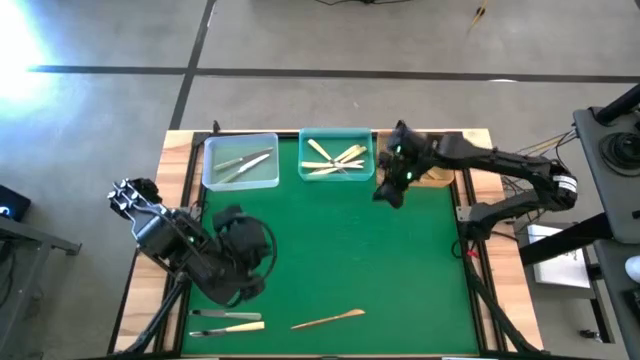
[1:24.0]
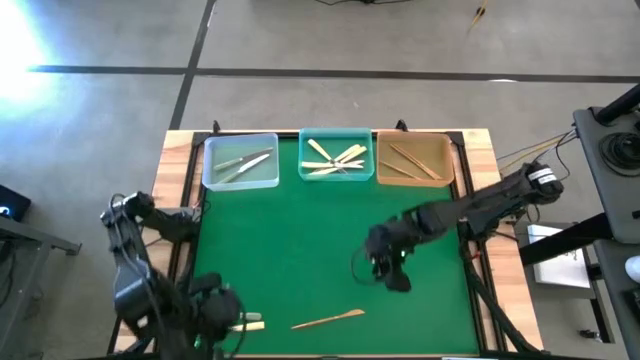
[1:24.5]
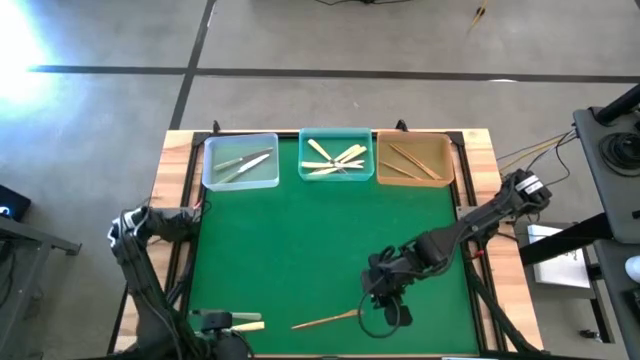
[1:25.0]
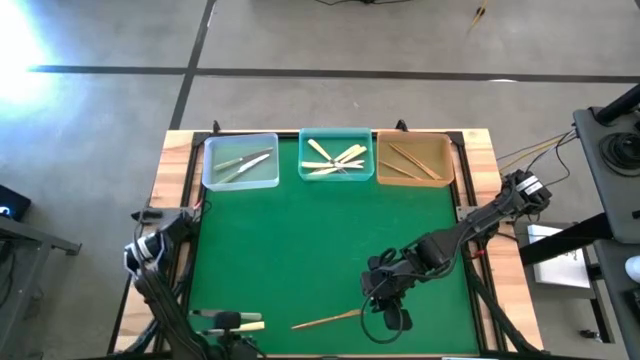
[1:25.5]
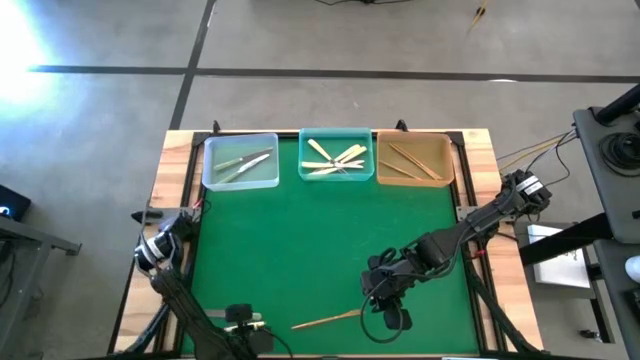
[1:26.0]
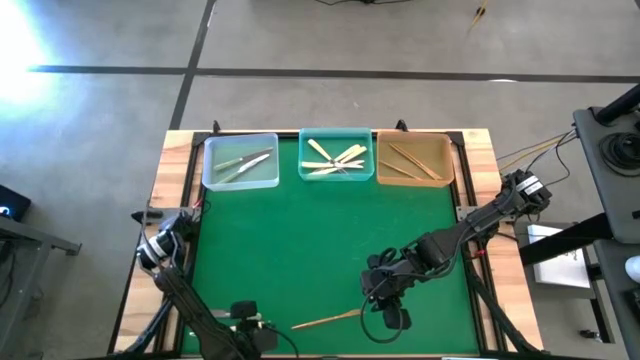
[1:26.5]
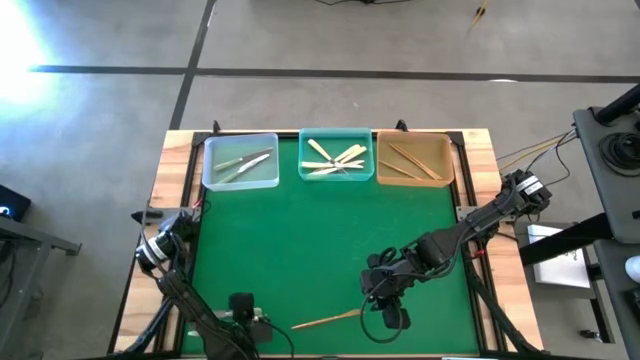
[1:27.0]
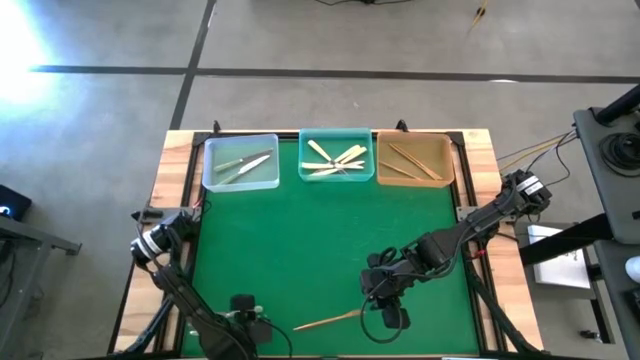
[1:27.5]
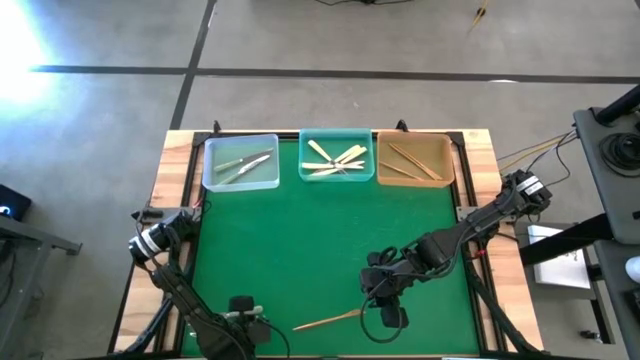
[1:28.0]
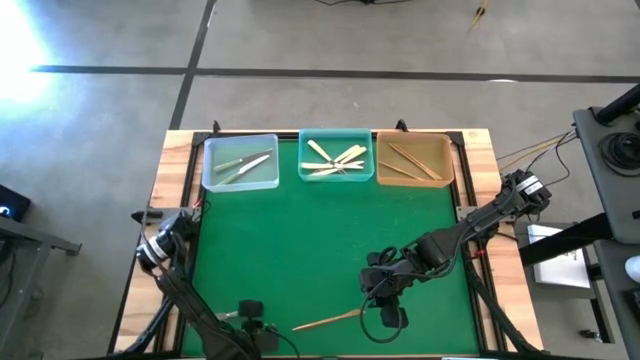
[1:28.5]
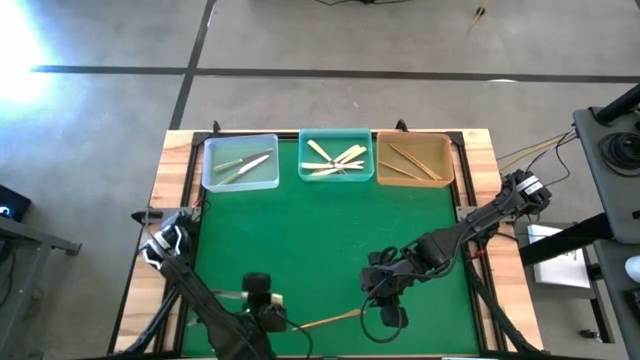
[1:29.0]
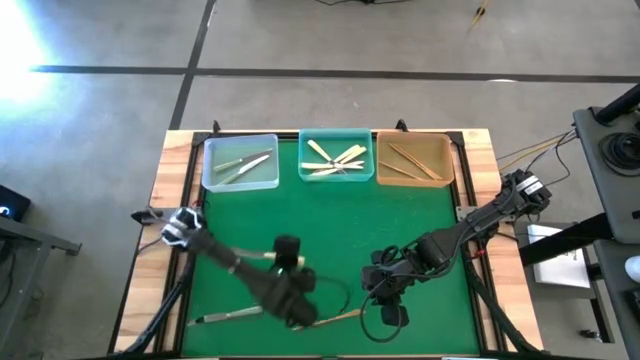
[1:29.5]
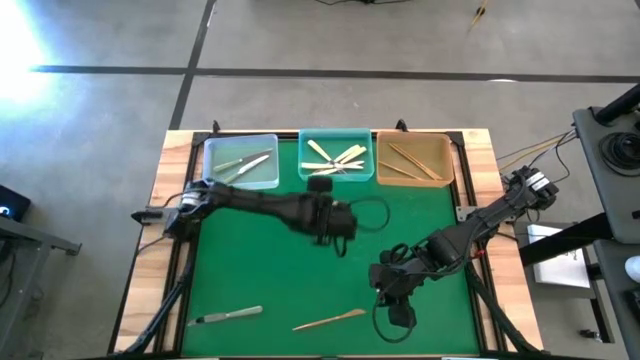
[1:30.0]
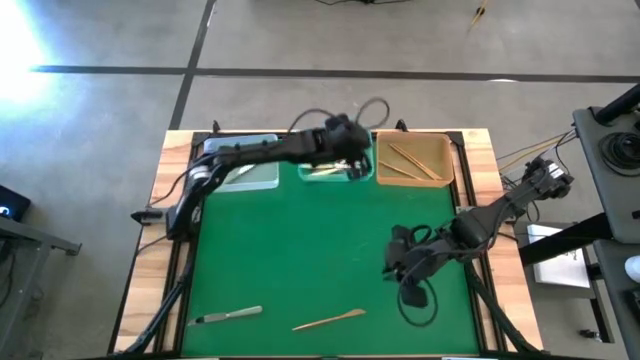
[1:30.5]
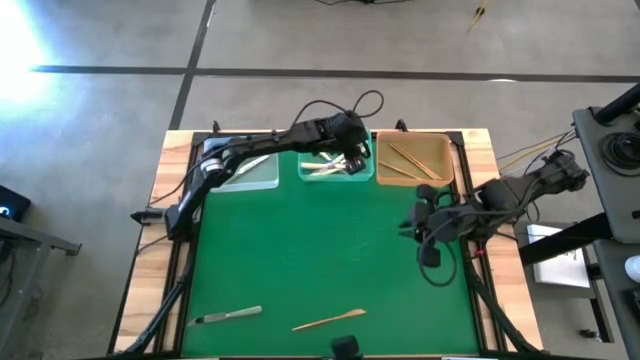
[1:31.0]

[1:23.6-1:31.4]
Task: Sort silverware by color (type)
Put the gold and silver knife into the blue bin

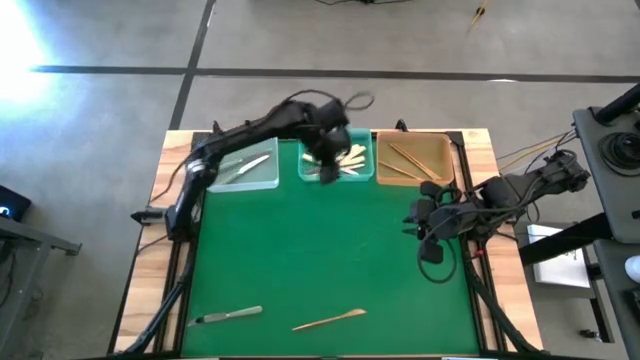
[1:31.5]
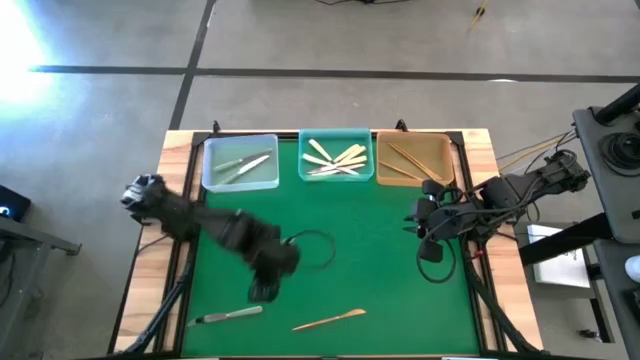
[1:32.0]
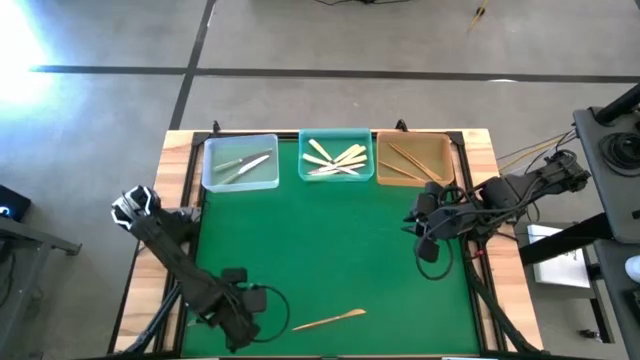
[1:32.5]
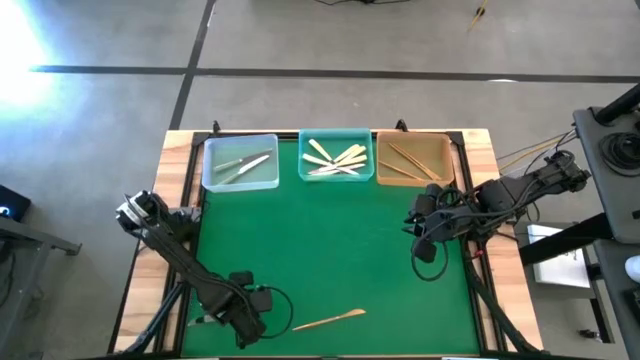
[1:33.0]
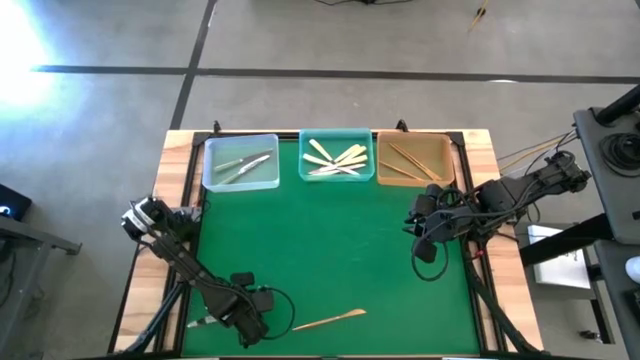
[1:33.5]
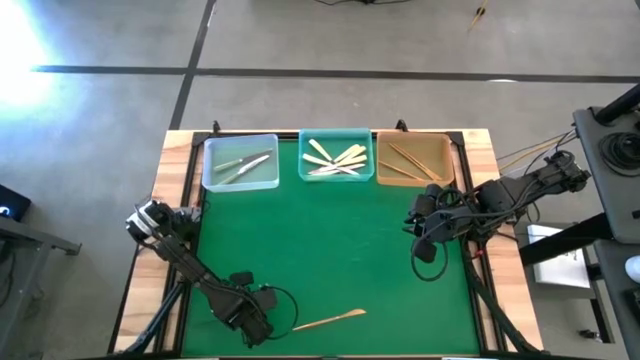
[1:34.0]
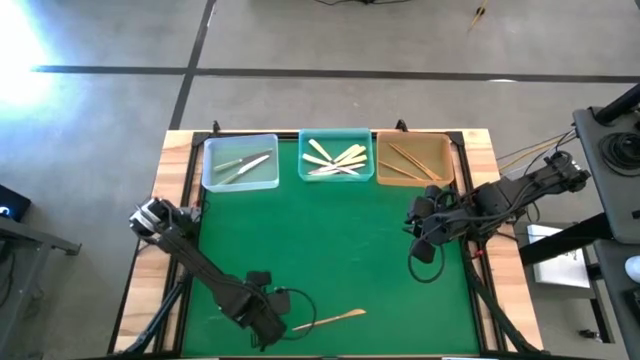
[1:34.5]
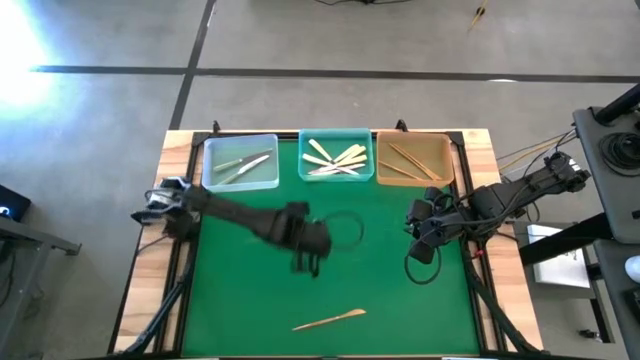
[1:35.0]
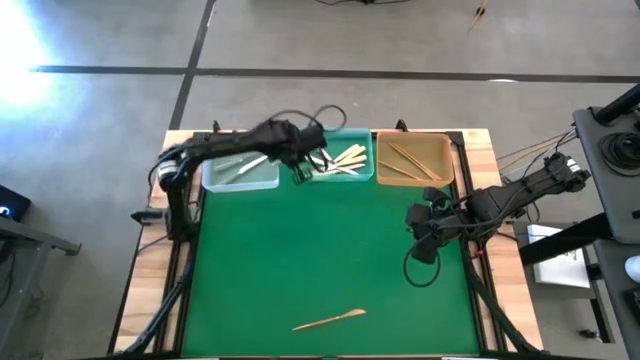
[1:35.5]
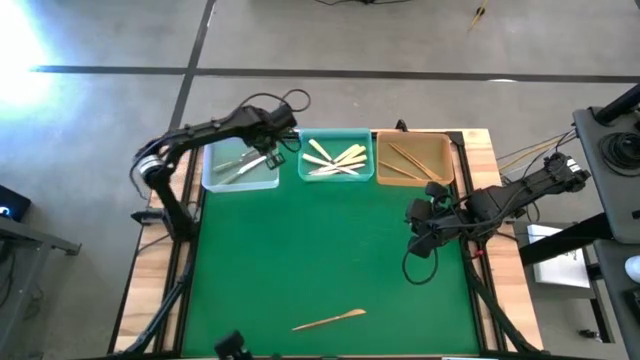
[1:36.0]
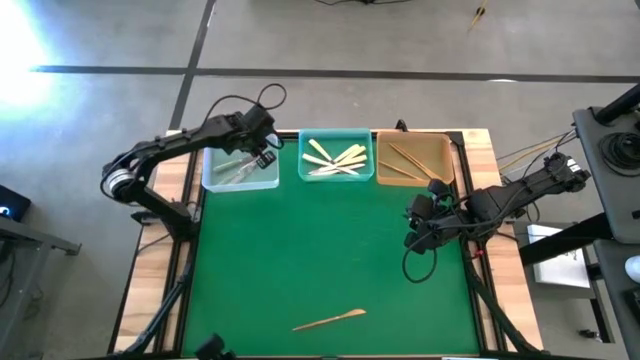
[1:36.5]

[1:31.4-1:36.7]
Put the silver knife into the transparent bin

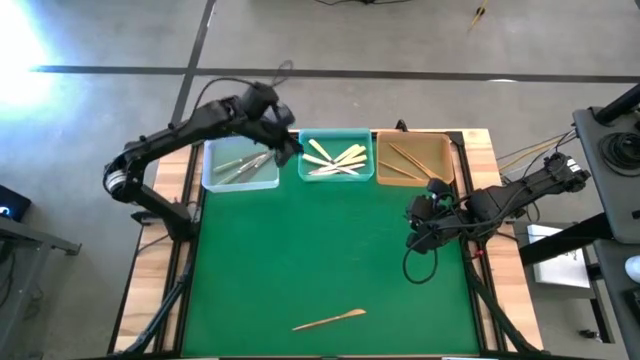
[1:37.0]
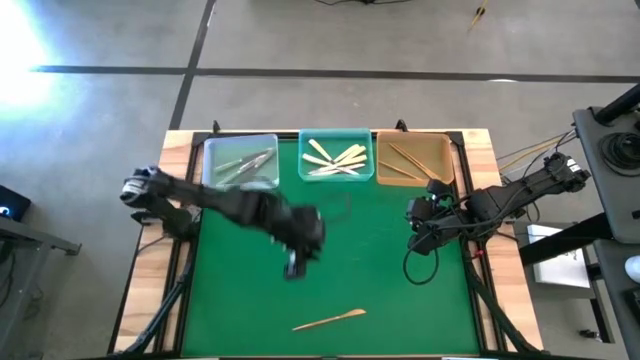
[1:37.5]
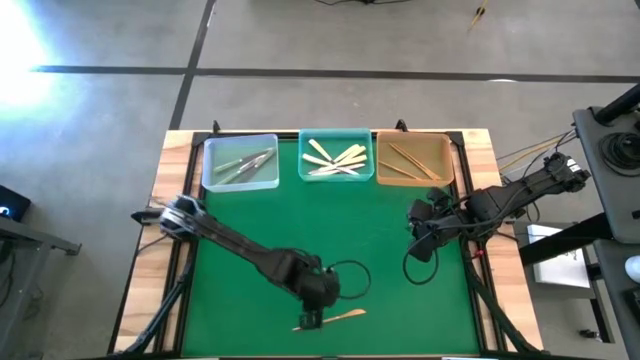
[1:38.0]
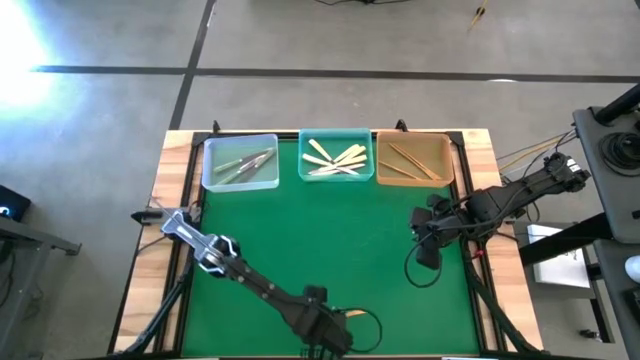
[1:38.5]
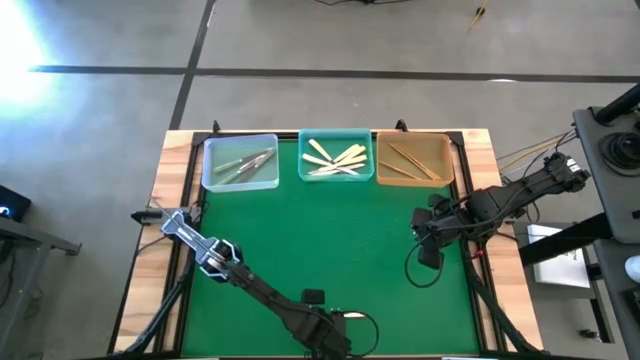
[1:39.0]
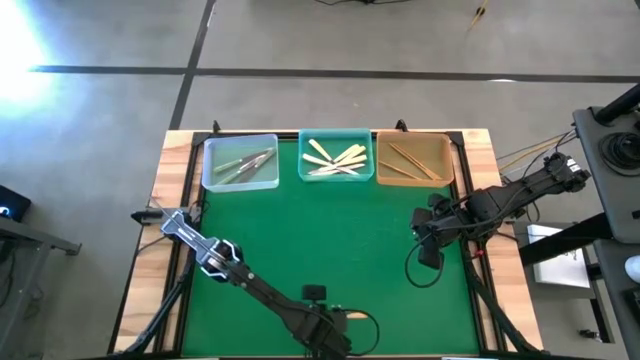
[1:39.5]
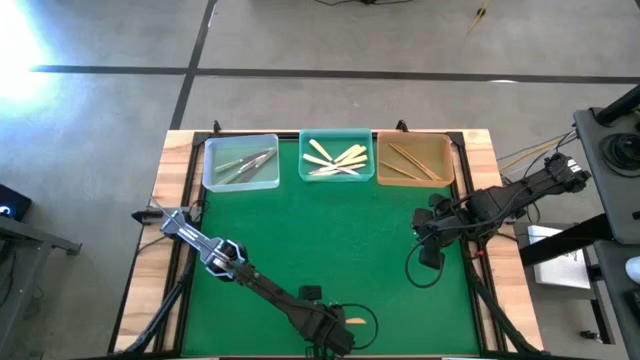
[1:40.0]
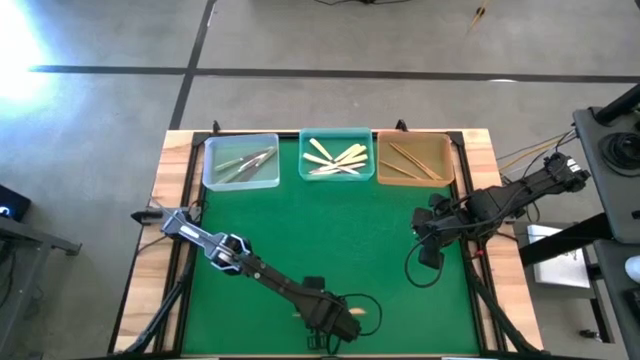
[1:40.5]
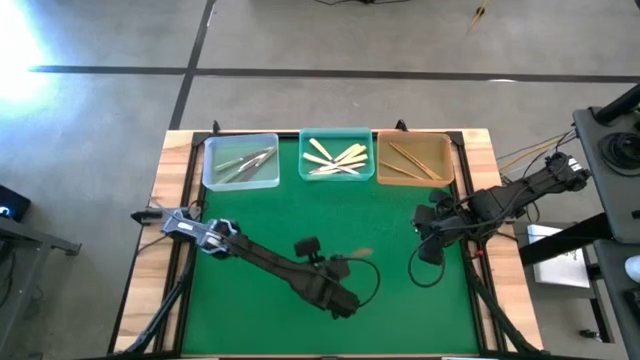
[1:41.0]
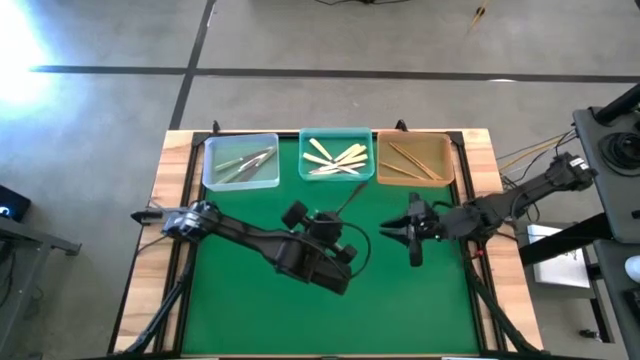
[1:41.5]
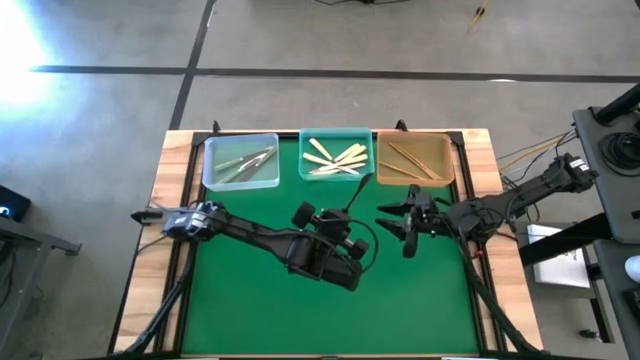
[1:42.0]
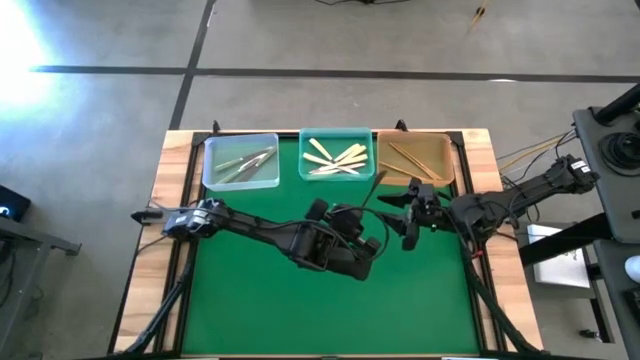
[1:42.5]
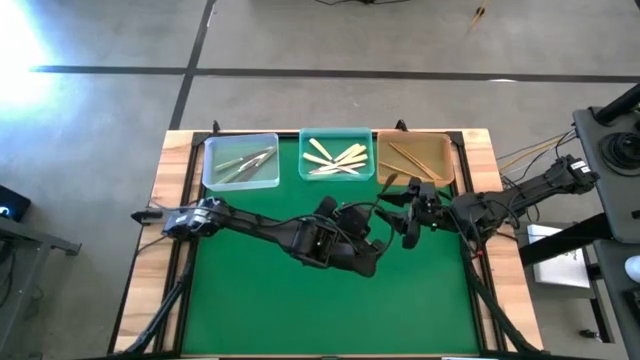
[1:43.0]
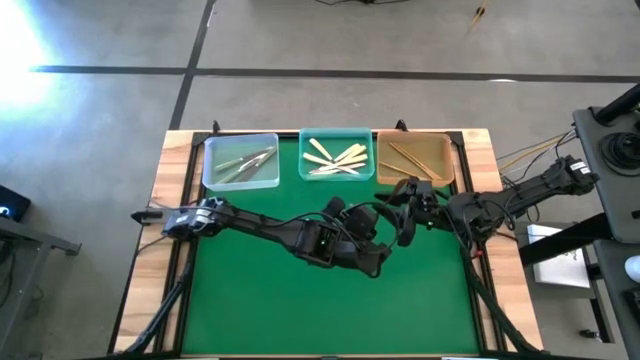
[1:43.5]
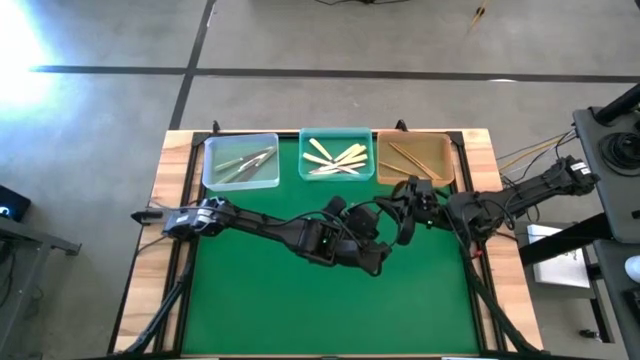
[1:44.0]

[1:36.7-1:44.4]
Put the gold knife into the yellow bin

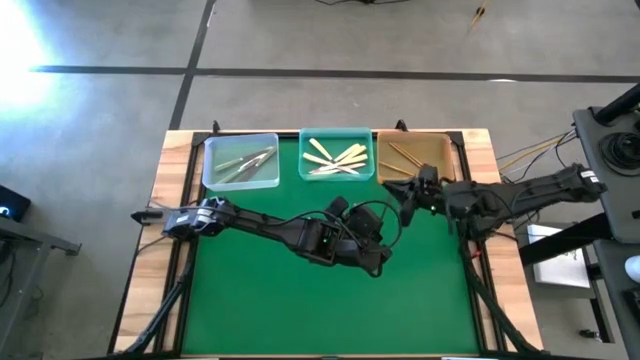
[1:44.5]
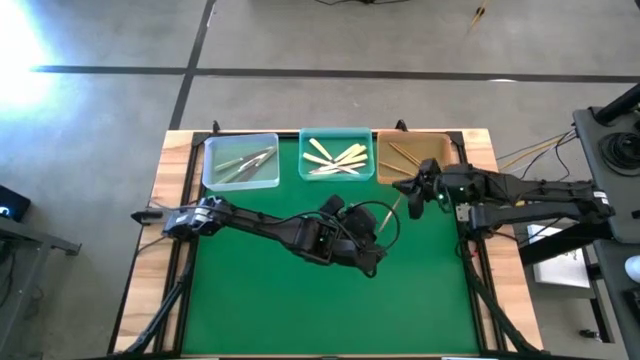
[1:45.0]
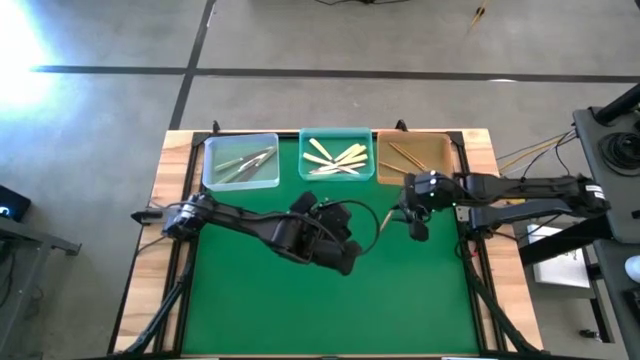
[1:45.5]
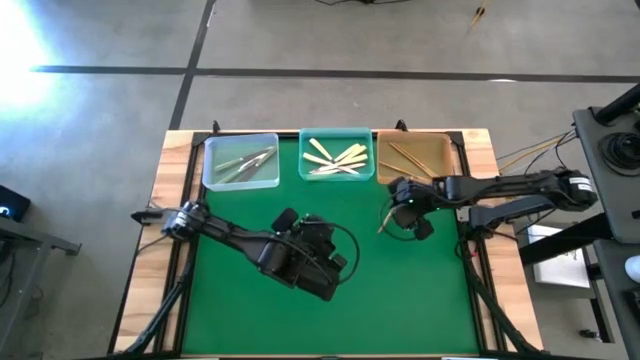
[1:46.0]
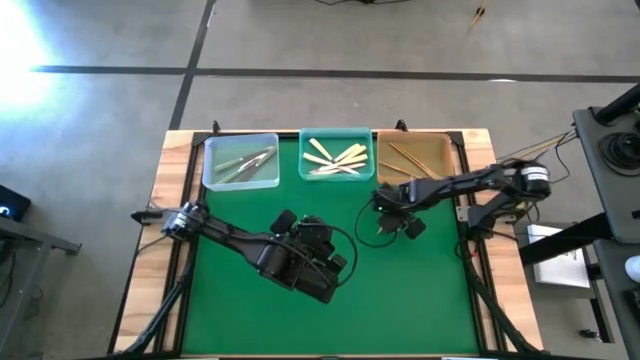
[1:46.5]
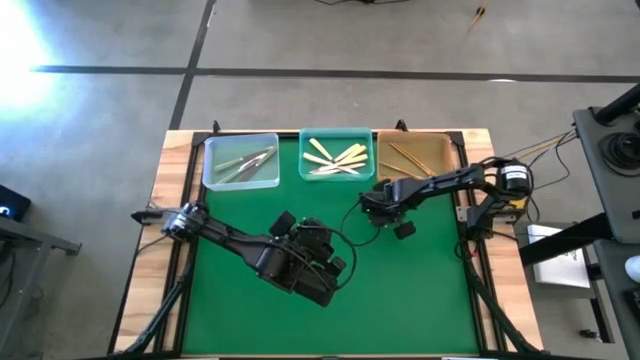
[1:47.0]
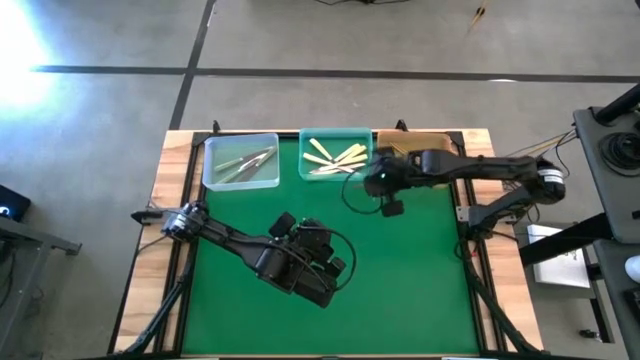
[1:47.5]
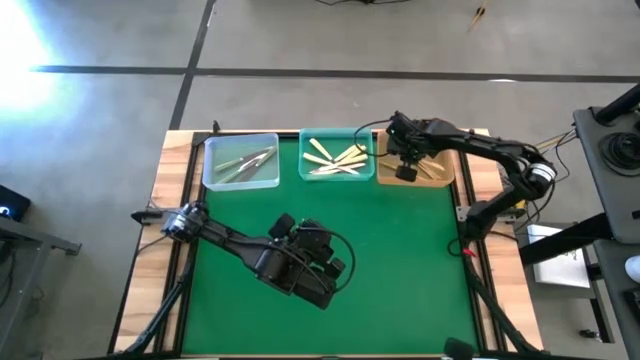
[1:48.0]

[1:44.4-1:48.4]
Put the gold knife into the yellow bin
